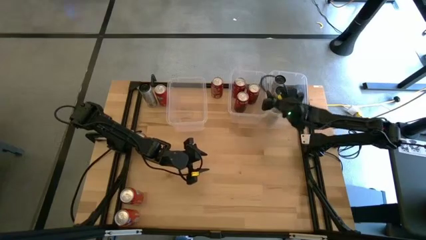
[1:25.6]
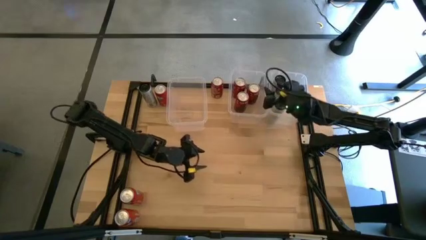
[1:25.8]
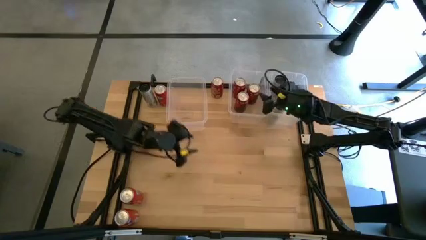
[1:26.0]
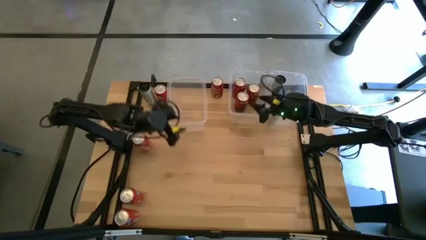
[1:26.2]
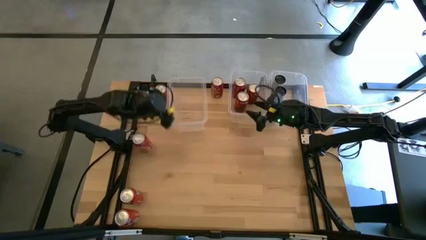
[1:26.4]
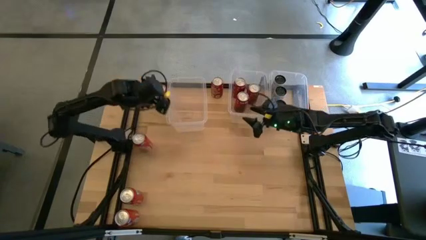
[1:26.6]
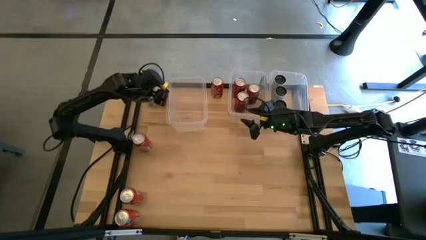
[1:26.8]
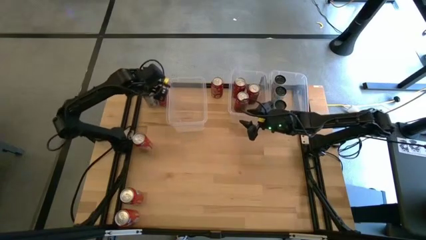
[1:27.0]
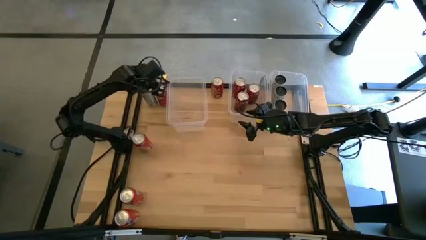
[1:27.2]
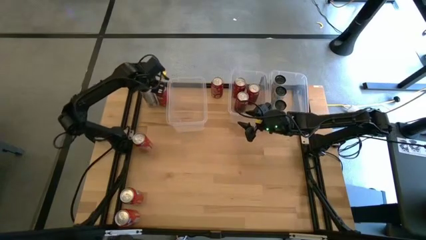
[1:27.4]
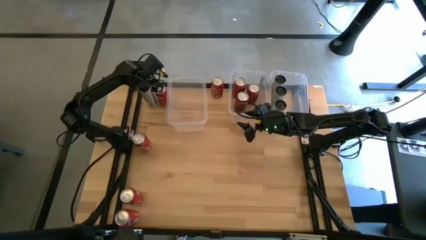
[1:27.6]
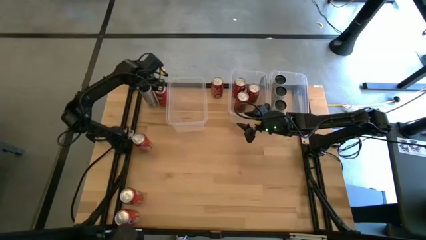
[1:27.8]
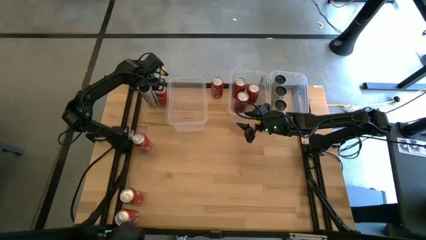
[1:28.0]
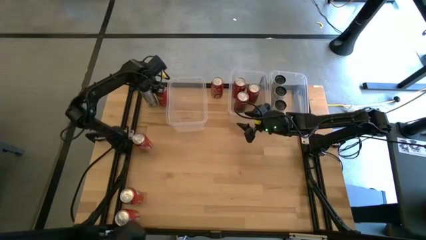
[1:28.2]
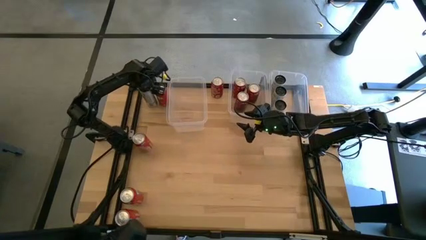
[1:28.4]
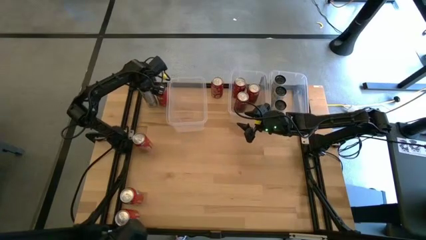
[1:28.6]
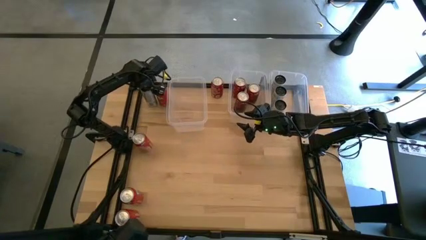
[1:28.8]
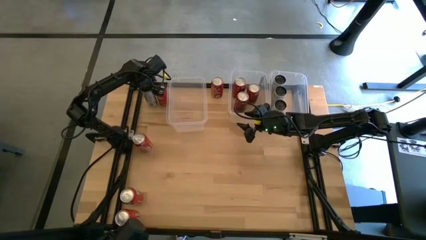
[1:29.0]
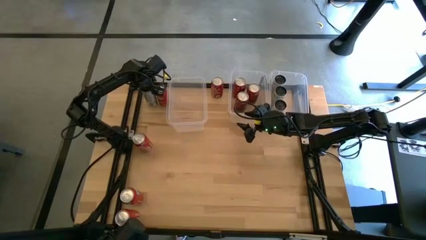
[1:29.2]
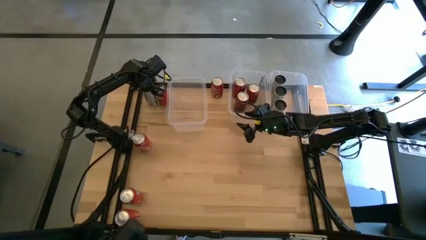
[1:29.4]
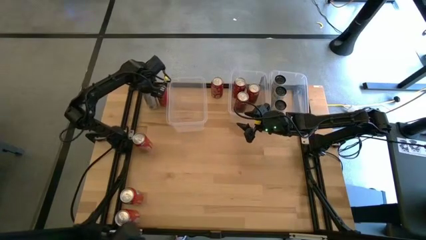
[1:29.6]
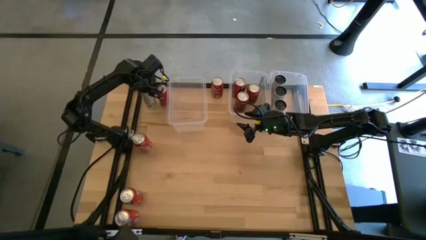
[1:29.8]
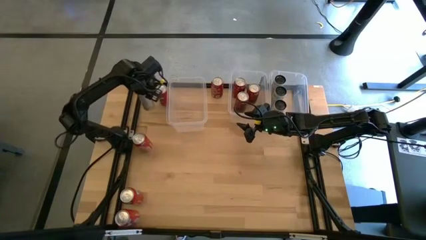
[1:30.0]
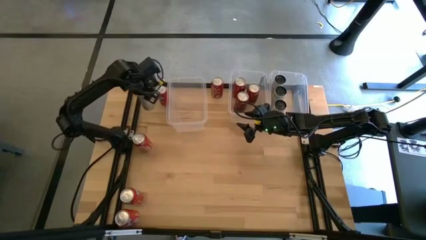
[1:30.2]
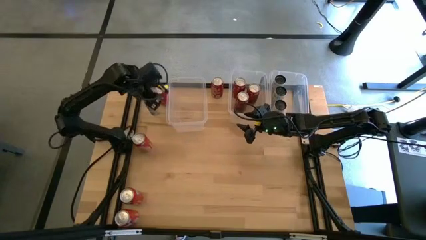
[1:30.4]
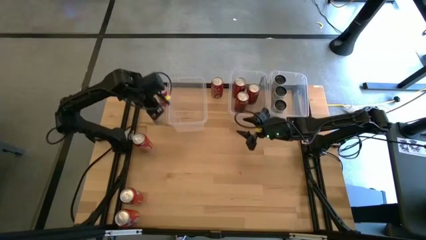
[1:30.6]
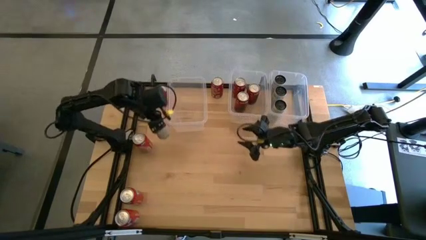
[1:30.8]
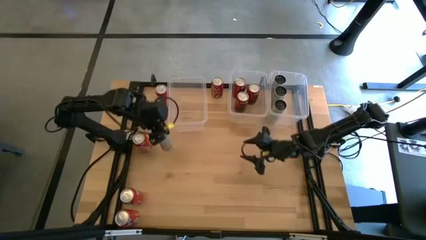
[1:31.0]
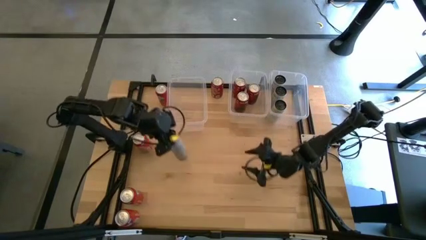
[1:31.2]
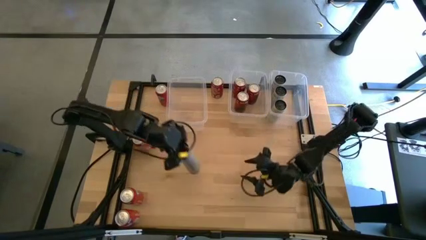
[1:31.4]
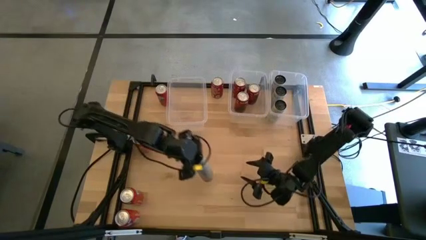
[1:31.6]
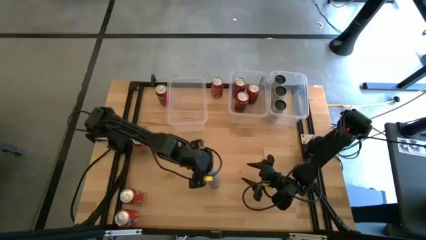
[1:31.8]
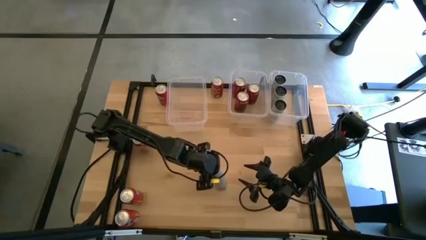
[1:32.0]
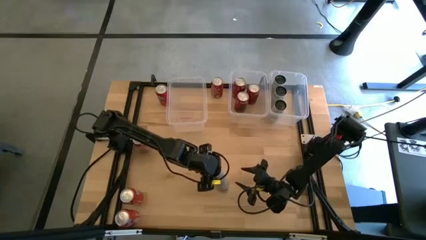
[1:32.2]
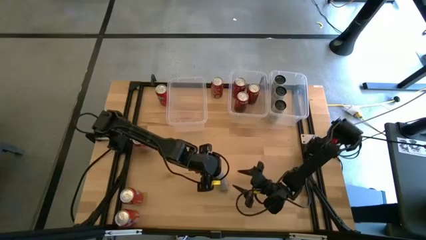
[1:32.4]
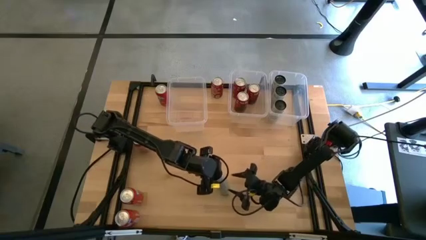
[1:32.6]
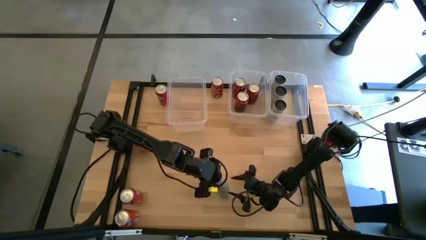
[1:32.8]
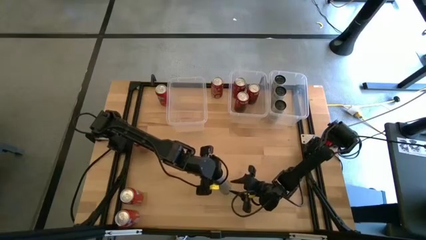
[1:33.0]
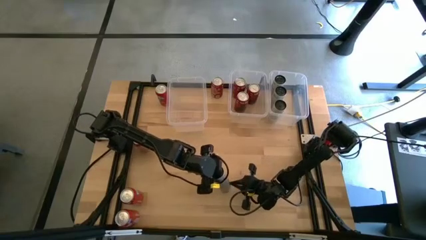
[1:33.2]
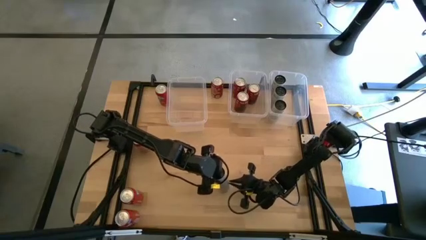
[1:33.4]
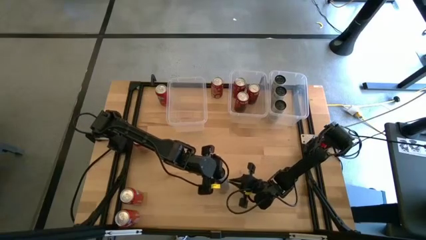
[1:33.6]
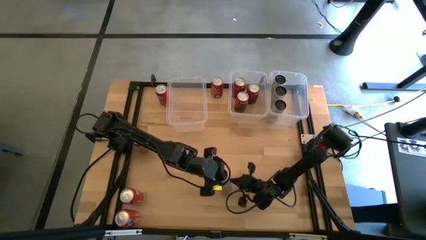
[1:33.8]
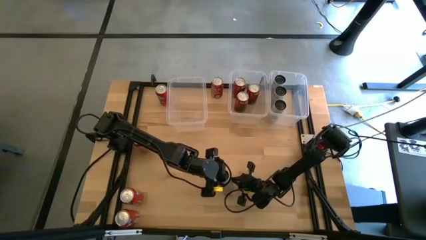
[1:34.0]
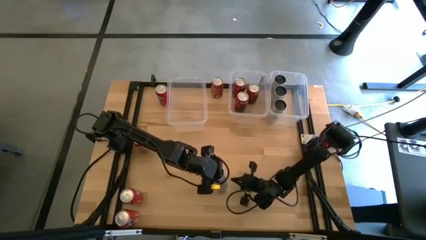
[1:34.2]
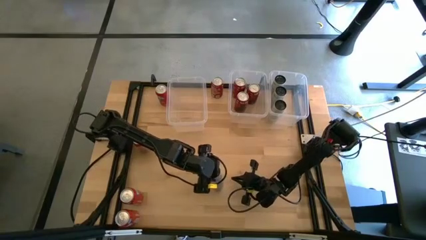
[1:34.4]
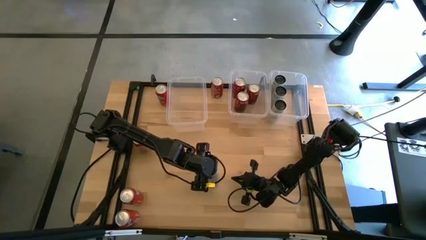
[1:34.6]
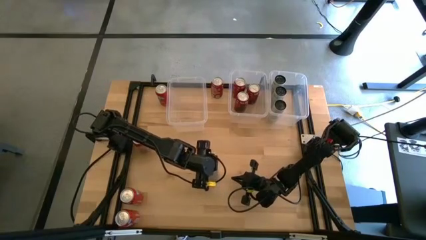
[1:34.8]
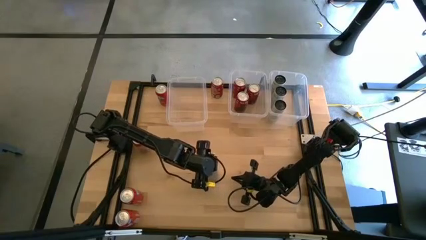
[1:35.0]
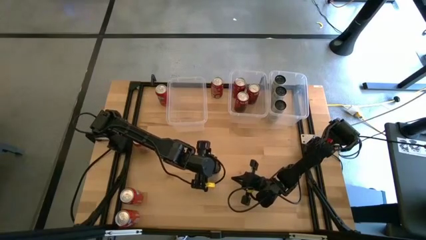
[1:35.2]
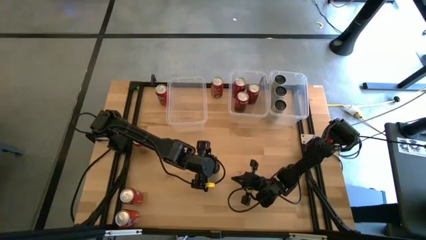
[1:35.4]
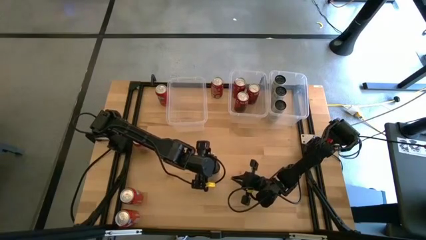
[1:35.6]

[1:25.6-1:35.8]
Task: Sort soda cans
Move the white and yellow soda can to the center of the table
